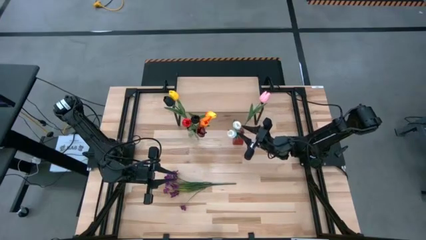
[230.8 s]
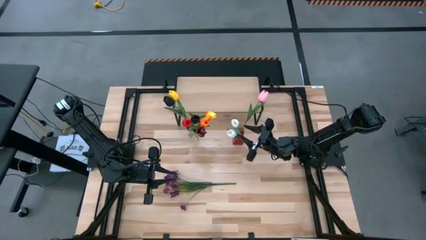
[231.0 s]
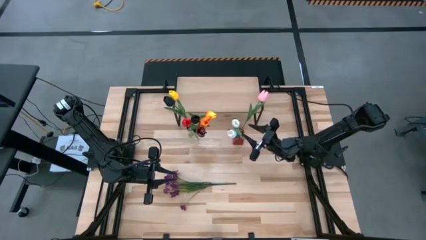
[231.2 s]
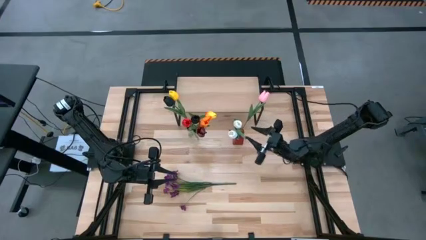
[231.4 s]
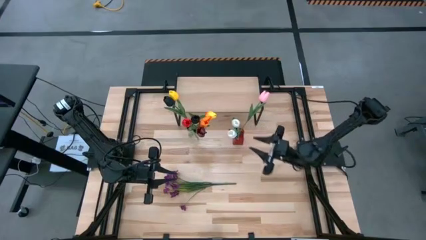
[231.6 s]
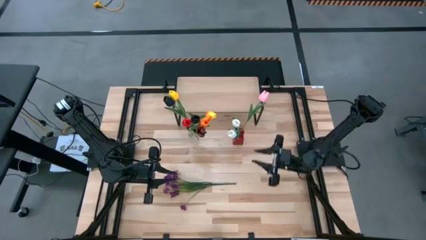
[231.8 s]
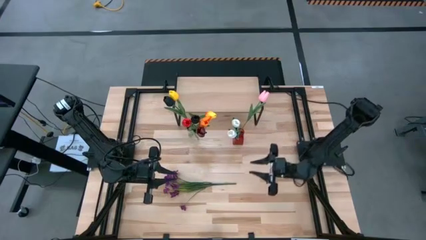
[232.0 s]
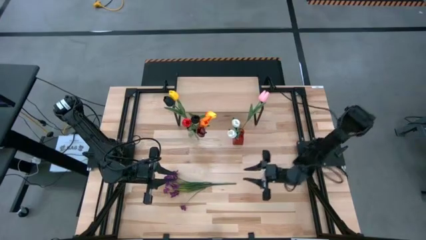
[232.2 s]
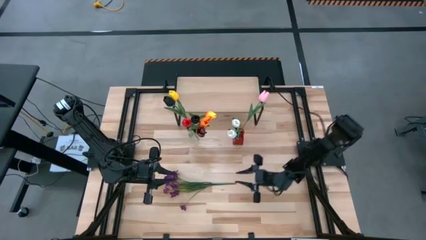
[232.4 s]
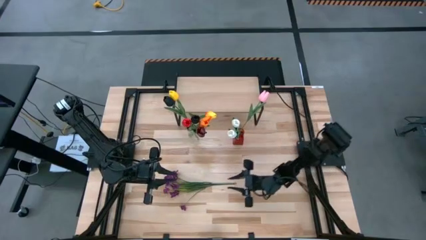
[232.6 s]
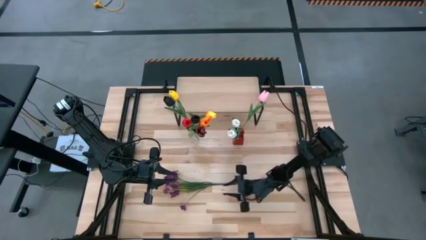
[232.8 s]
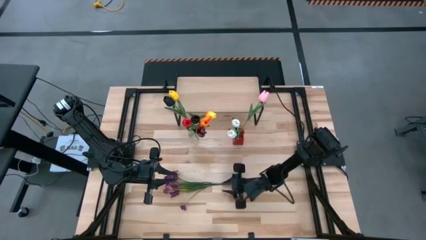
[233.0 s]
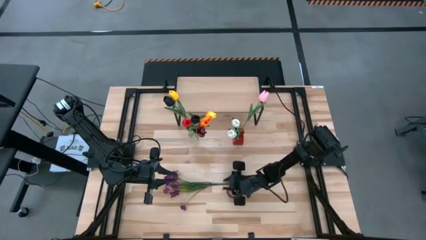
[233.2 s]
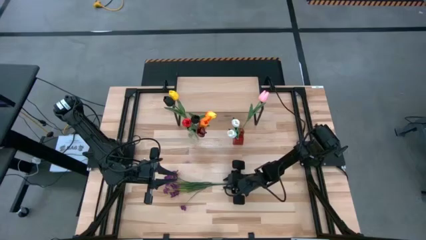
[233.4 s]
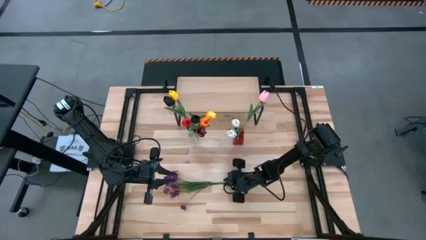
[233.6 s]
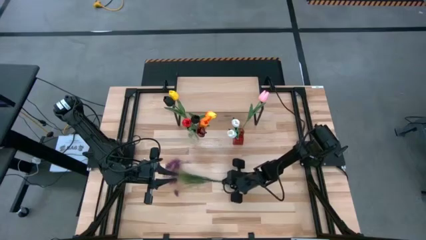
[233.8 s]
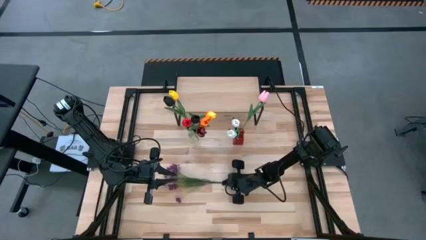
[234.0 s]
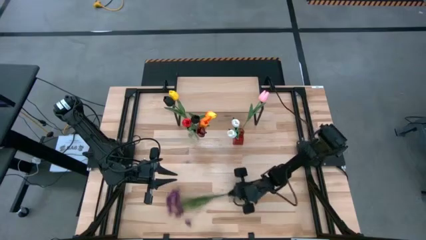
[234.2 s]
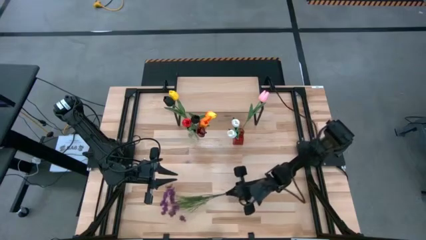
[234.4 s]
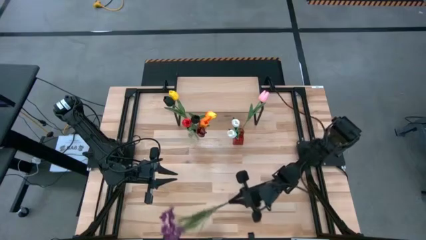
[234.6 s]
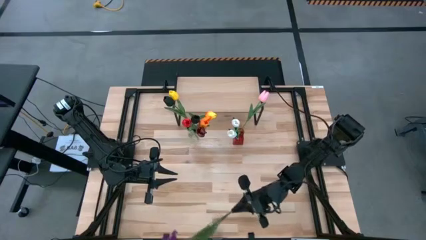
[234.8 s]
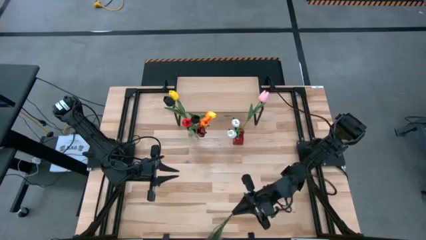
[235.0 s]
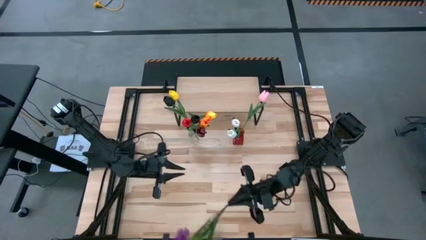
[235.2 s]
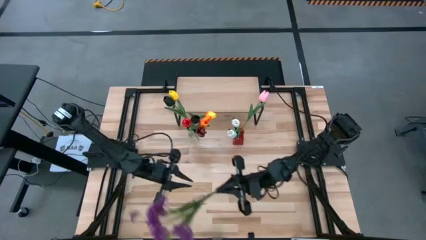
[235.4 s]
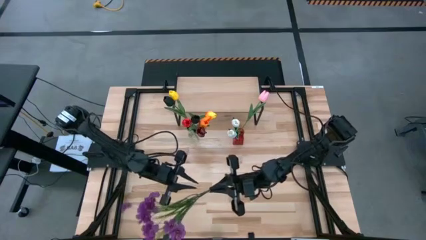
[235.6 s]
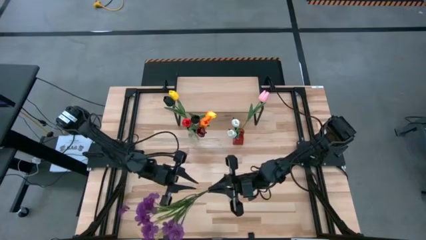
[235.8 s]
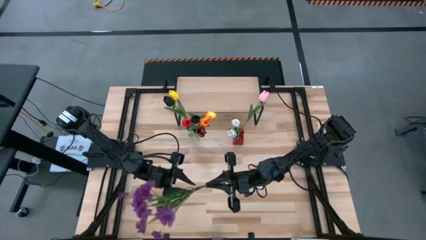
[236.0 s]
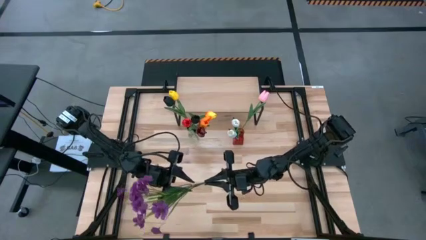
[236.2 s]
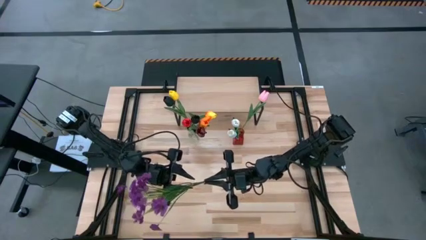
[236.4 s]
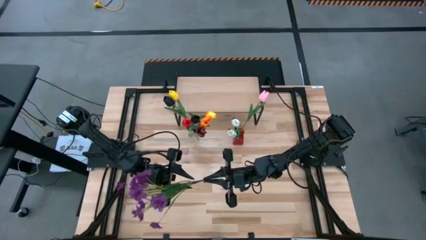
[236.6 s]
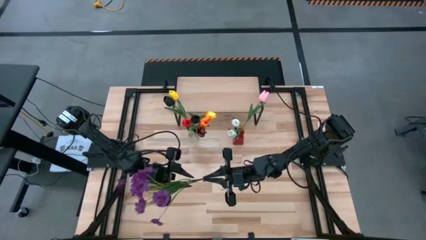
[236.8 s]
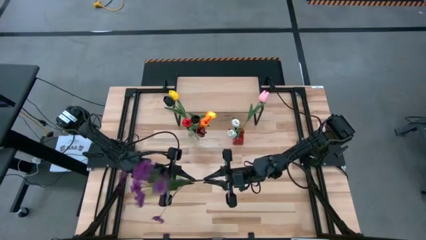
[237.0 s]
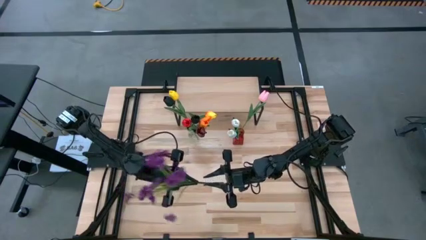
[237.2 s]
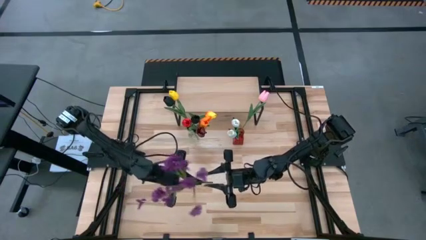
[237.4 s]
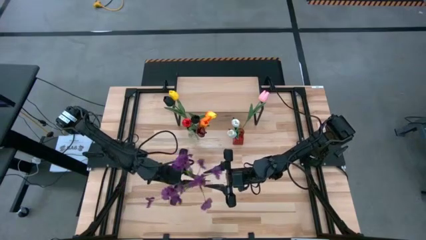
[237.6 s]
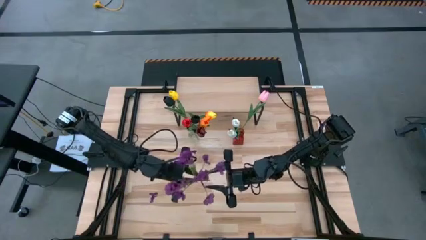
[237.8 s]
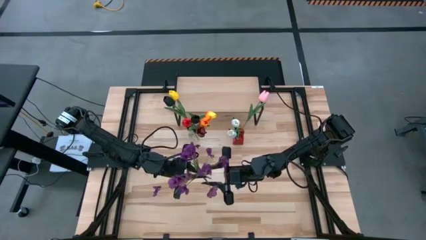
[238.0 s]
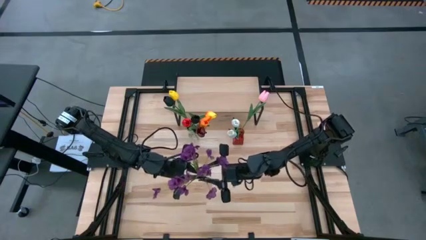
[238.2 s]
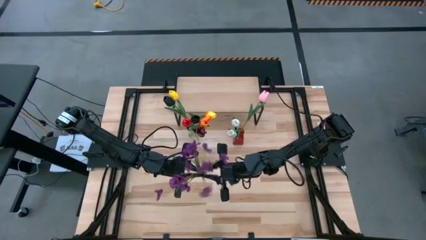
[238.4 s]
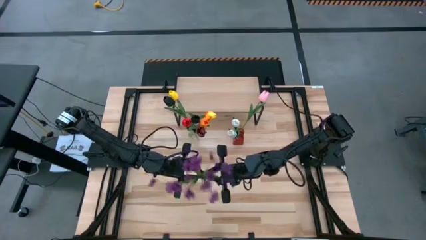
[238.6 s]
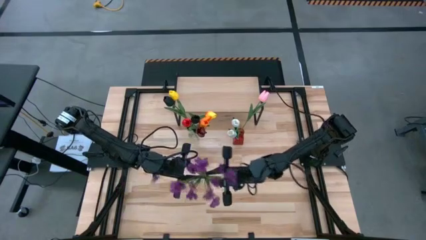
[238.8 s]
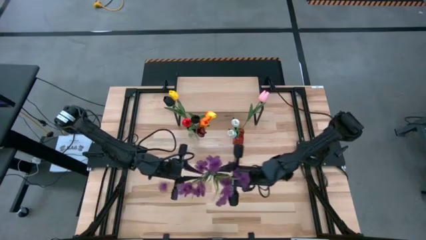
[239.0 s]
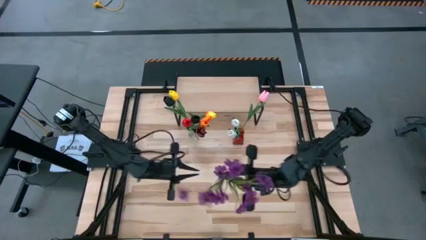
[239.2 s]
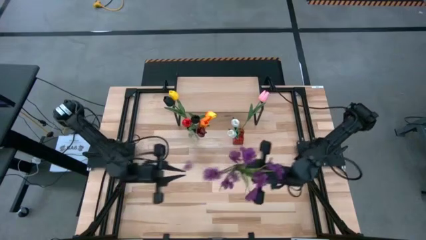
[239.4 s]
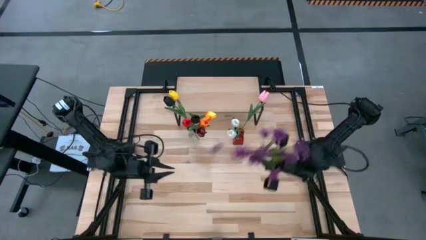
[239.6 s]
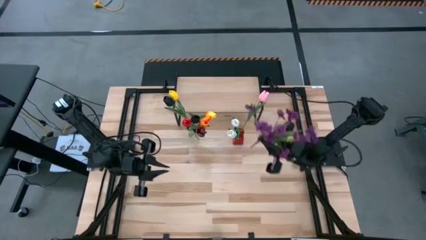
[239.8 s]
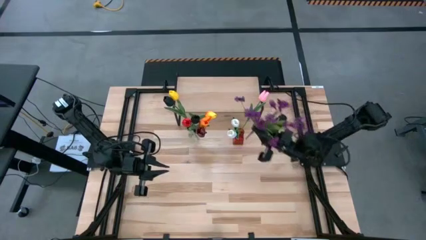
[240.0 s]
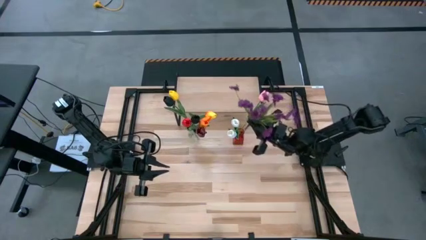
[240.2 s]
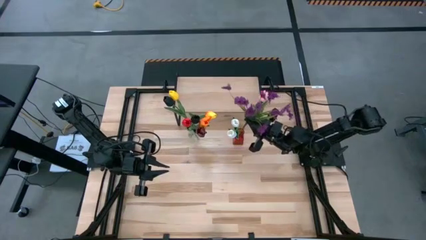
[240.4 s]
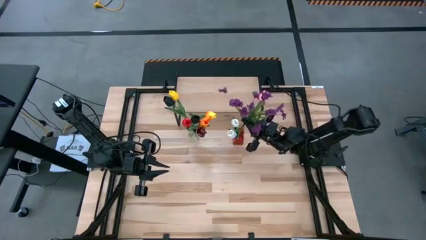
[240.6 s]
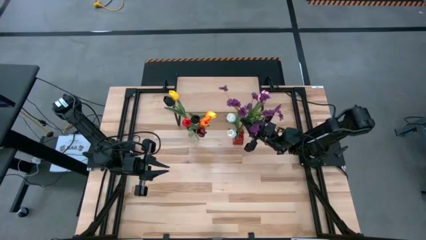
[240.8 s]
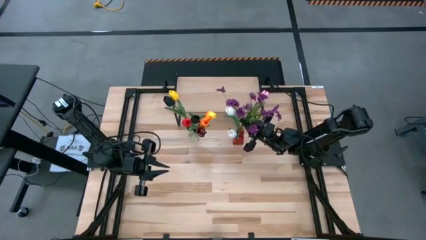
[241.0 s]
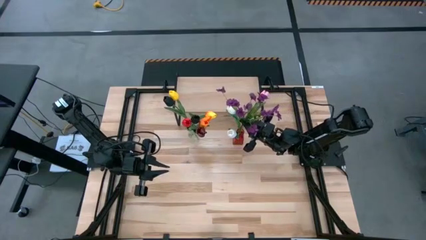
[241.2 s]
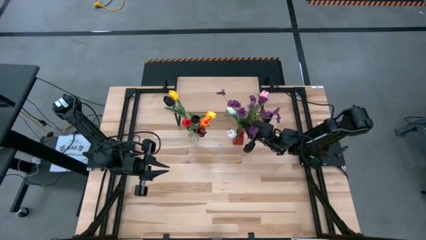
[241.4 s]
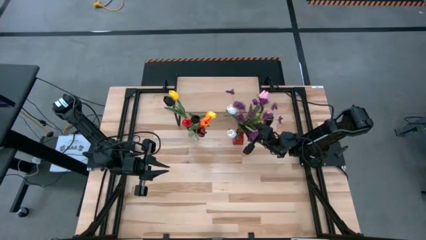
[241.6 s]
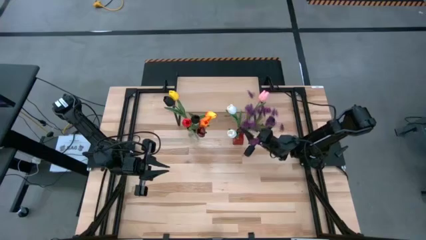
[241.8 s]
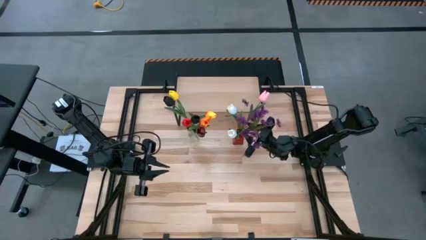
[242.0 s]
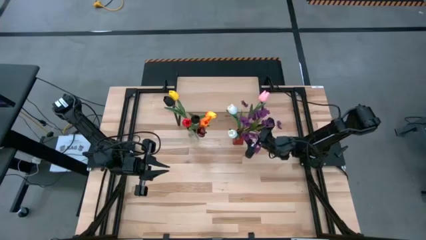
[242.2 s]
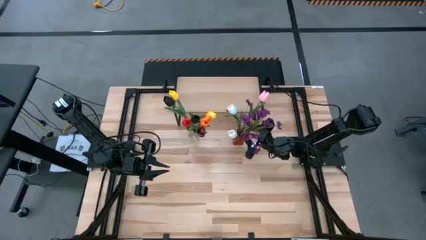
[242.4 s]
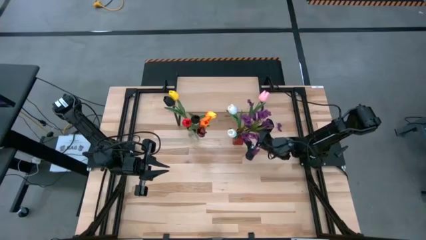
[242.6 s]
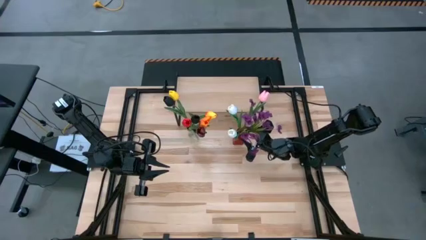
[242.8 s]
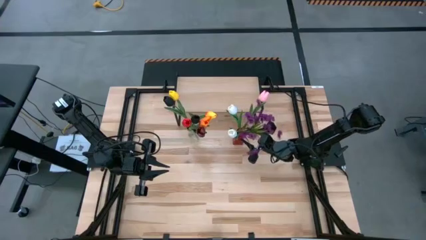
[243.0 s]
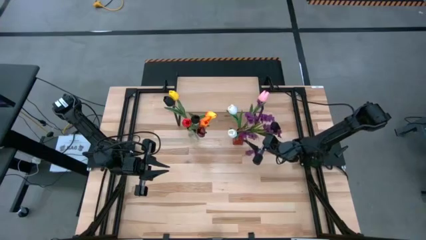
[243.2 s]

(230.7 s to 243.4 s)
Task: Pick and place flowers into a vace then onto a shelf
Put the purple flowers into the red vase

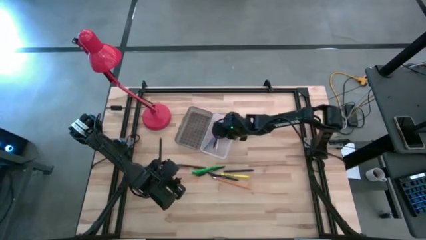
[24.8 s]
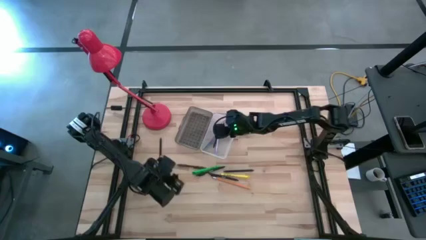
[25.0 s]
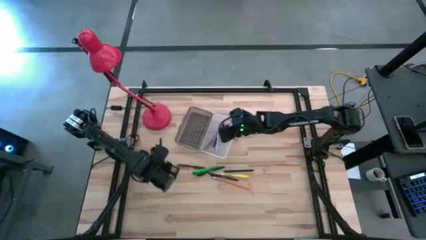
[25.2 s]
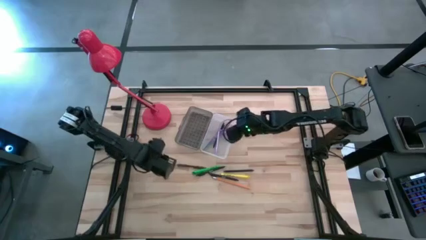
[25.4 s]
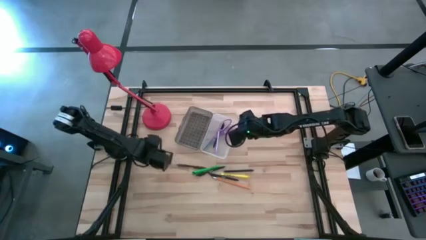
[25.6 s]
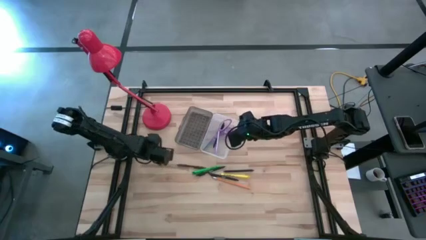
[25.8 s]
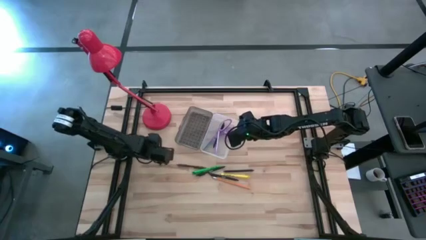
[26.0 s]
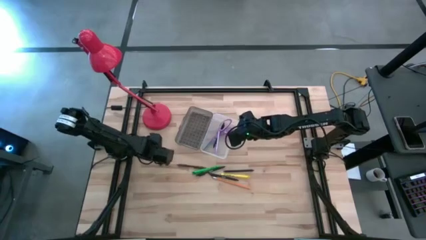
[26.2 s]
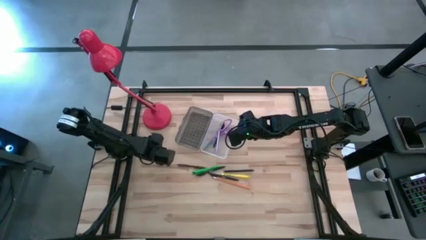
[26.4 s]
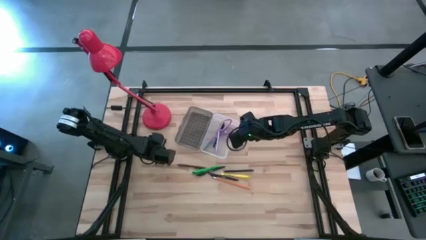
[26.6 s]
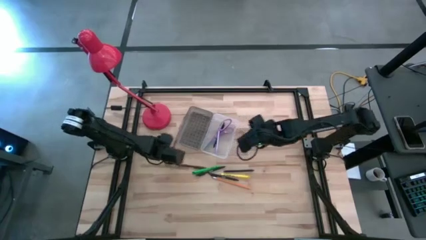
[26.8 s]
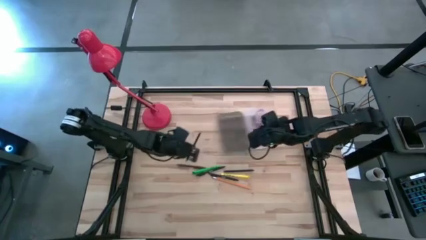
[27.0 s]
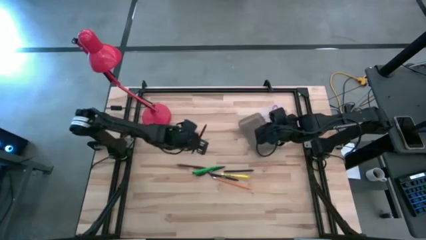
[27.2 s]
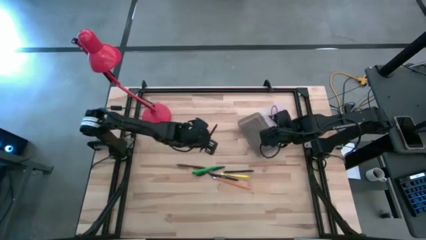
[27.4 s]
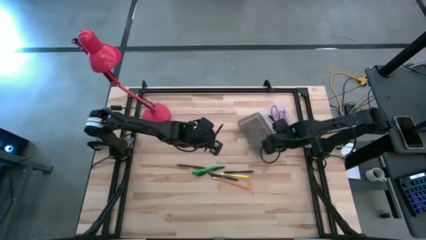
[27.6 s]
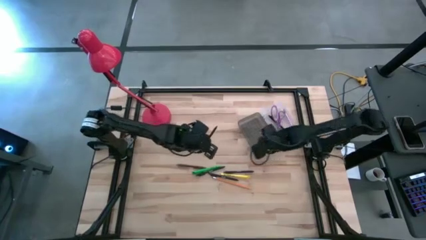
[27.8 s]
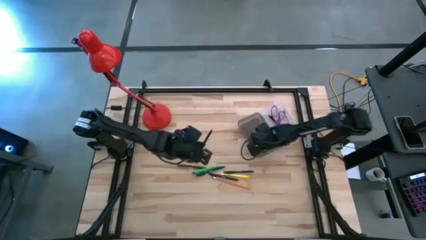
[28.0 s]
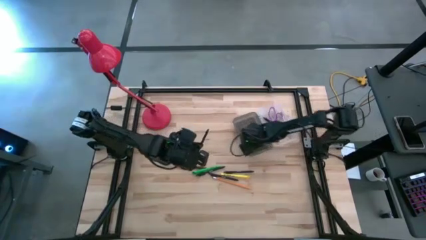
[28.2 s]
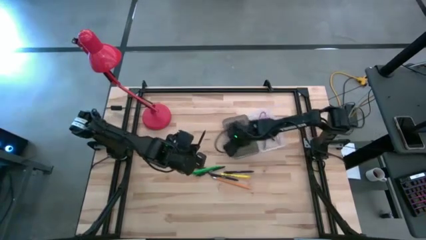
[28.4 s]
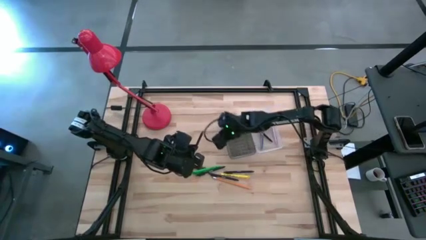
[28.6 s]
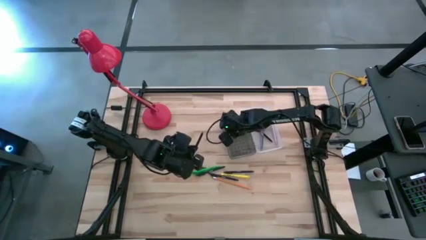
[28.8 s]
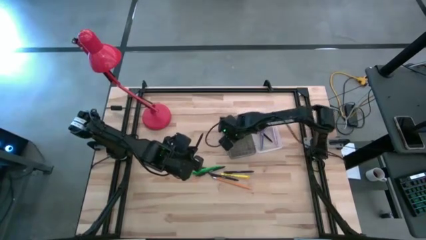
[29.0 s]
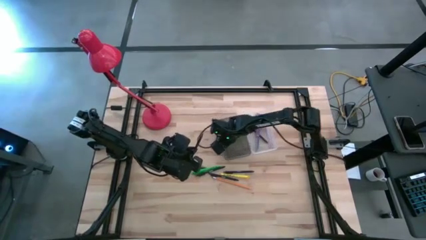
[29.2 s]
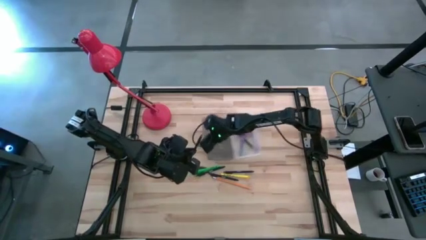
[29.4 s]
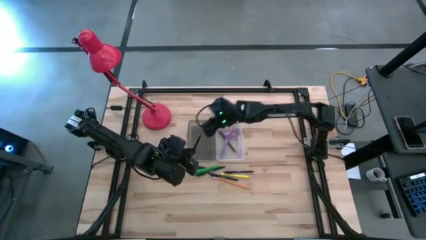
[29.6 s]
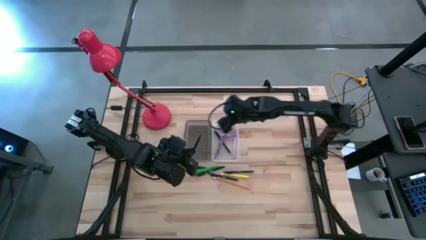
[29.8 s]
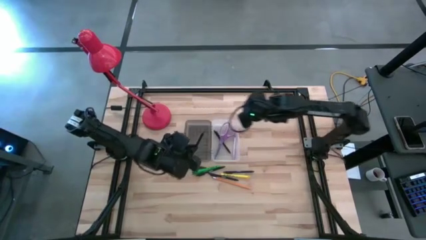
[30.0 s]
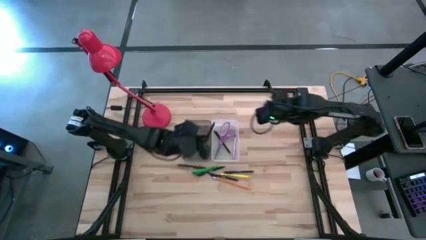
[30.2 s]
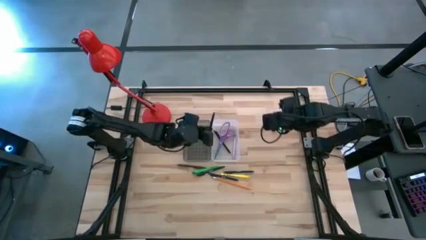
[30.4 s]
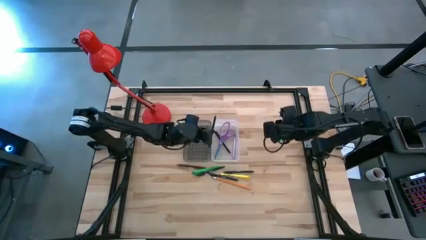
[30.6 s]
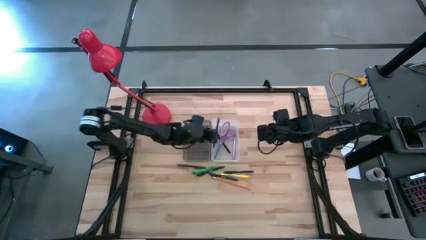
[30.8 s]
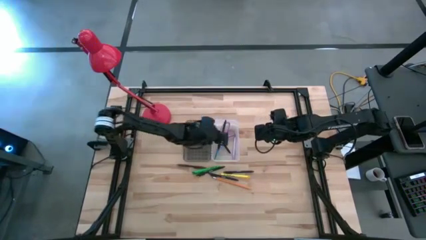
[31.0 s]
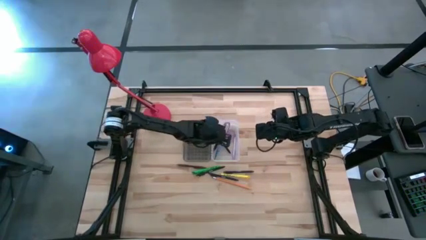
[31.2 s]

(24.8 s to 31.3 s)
Task: Pick & place school supplies into a supply box
Put the black pen into the supply box
